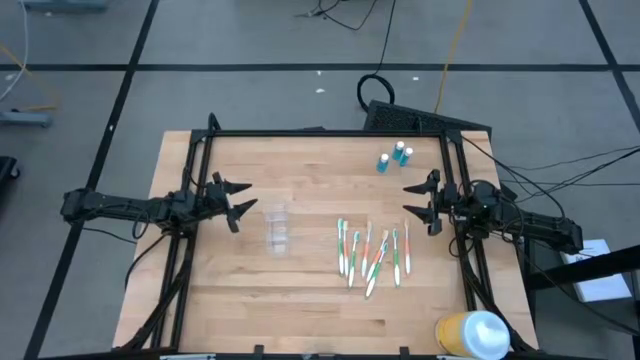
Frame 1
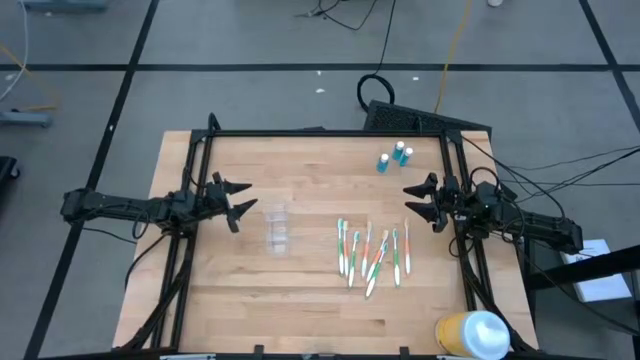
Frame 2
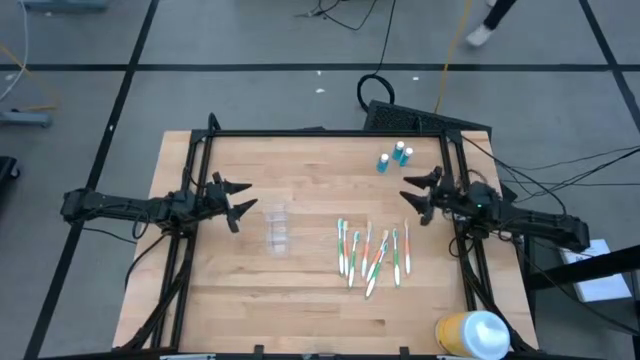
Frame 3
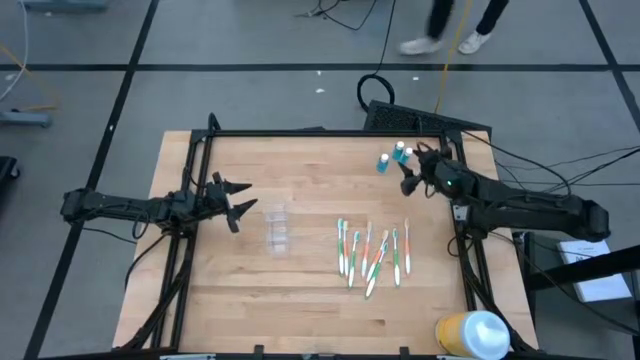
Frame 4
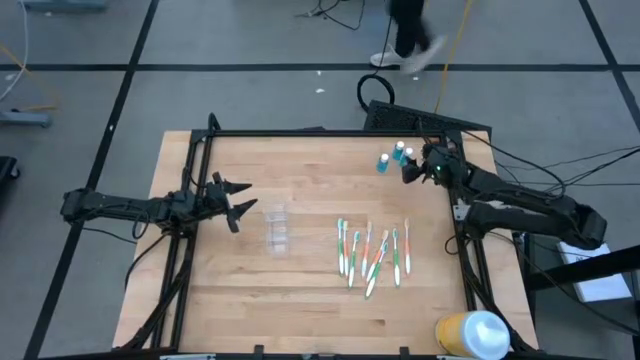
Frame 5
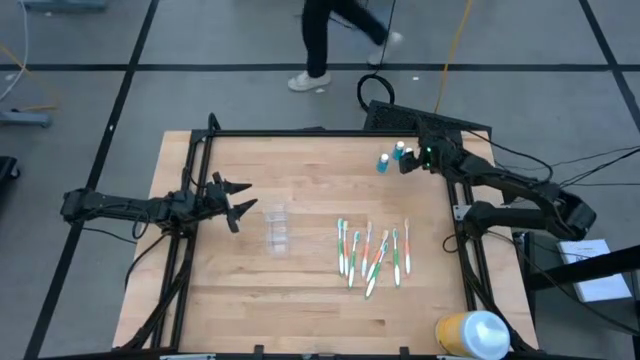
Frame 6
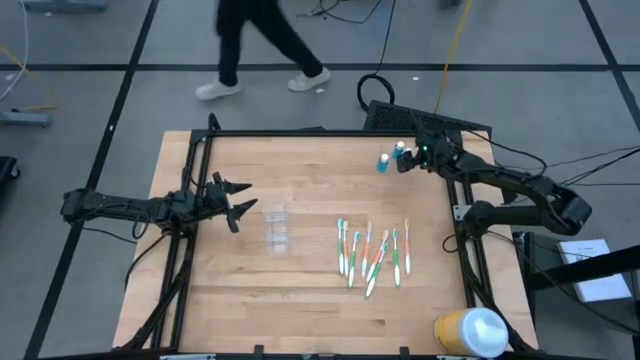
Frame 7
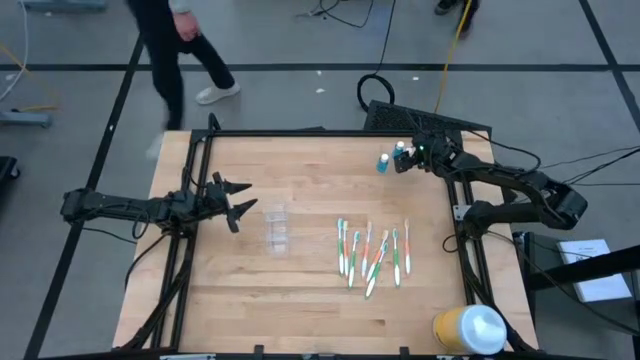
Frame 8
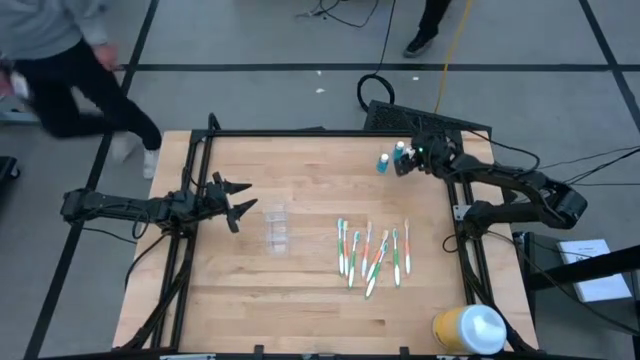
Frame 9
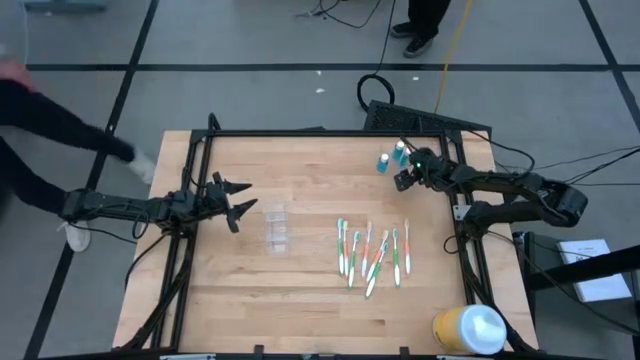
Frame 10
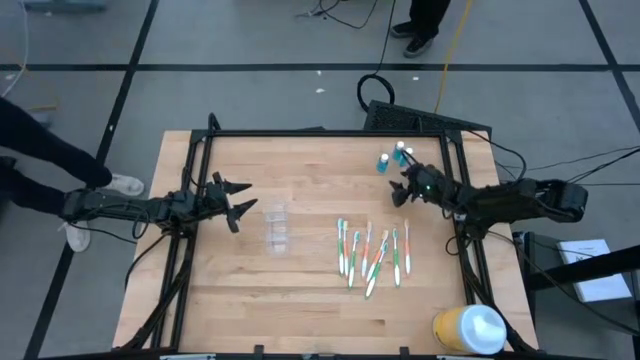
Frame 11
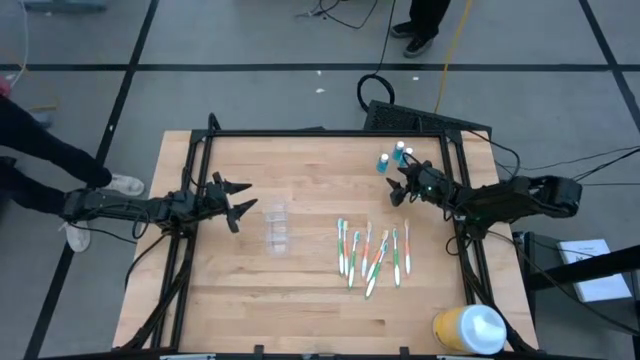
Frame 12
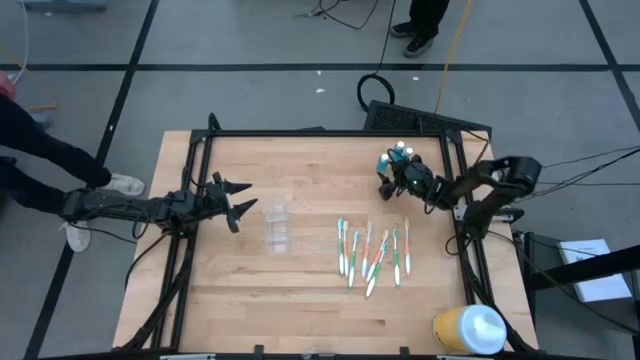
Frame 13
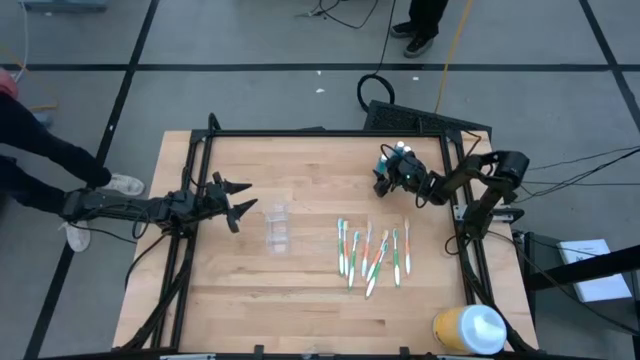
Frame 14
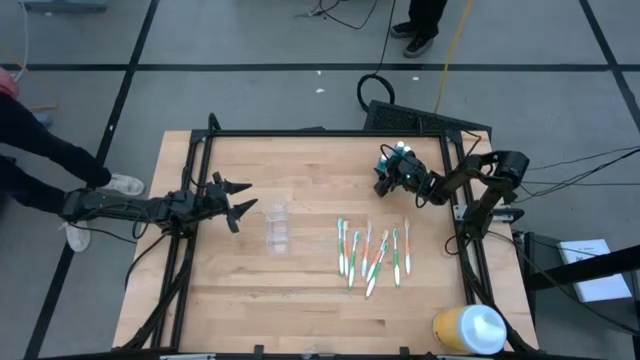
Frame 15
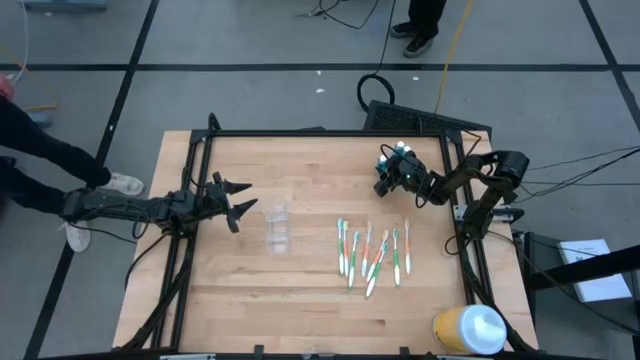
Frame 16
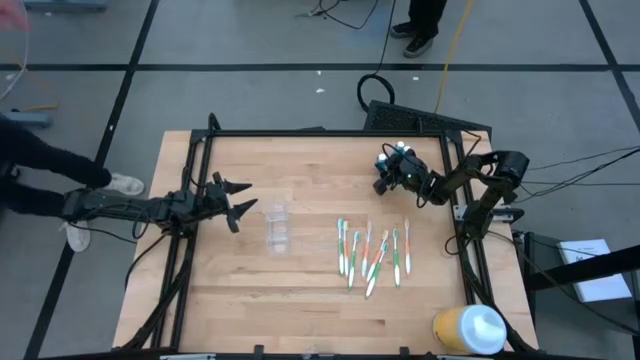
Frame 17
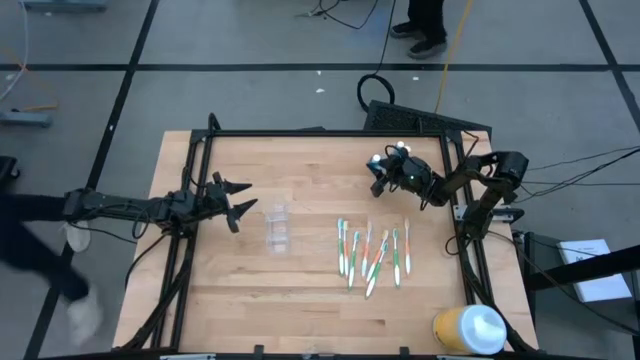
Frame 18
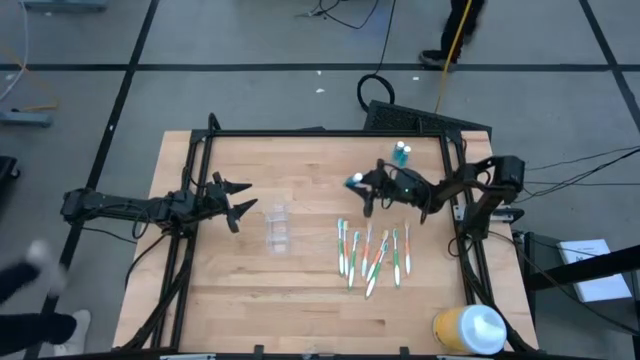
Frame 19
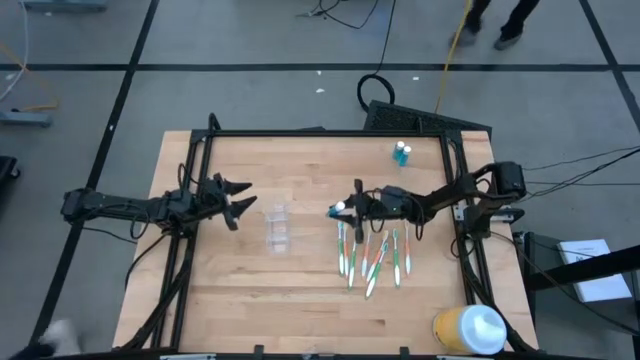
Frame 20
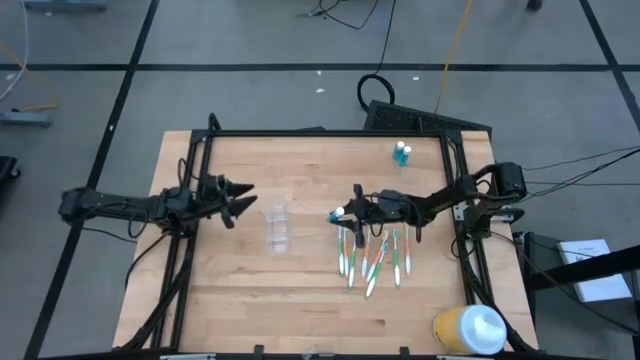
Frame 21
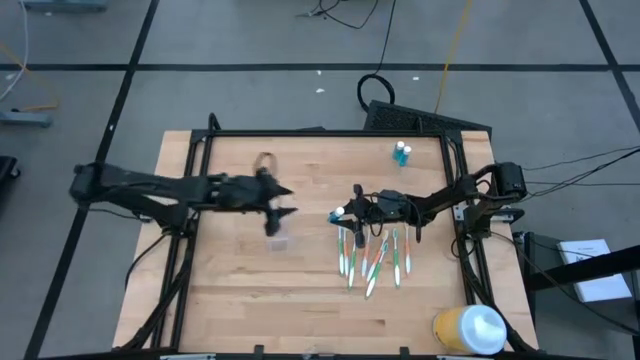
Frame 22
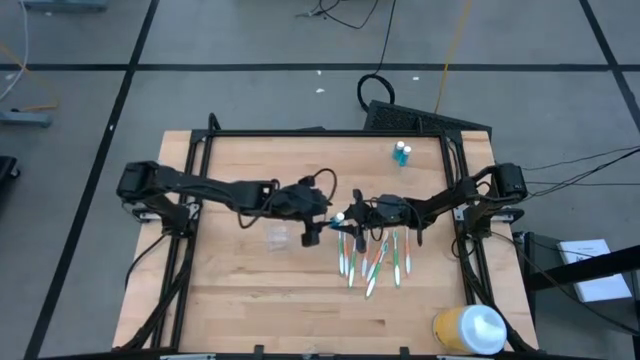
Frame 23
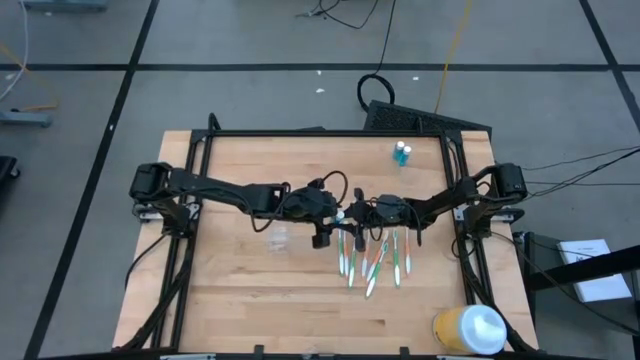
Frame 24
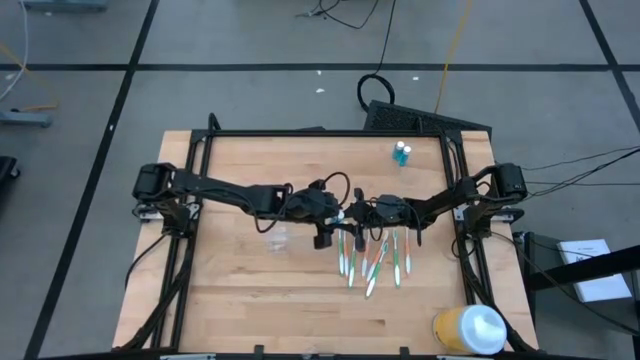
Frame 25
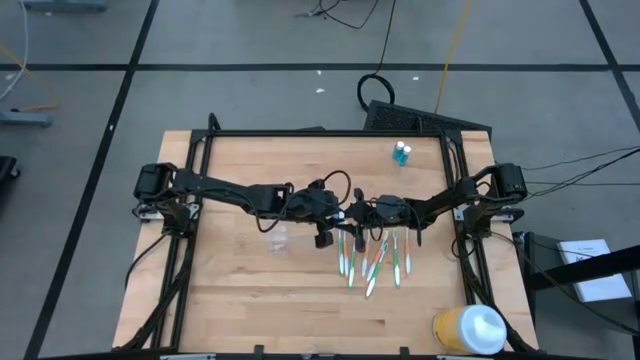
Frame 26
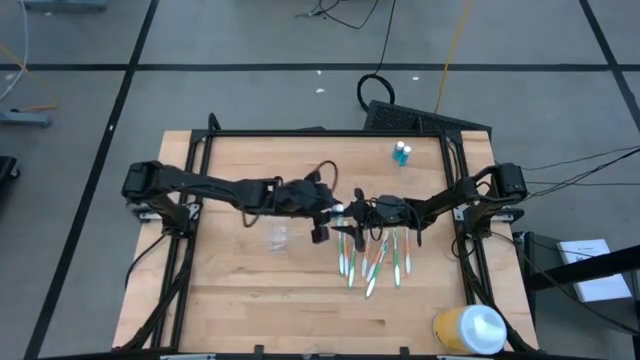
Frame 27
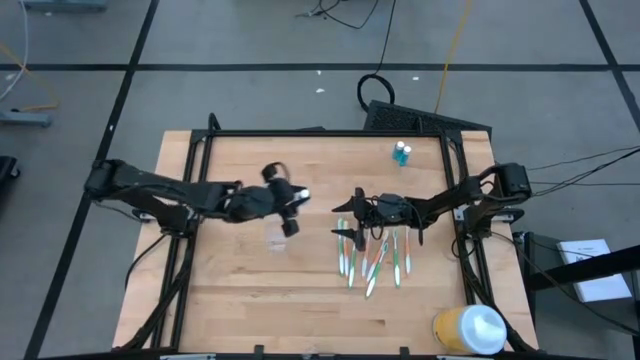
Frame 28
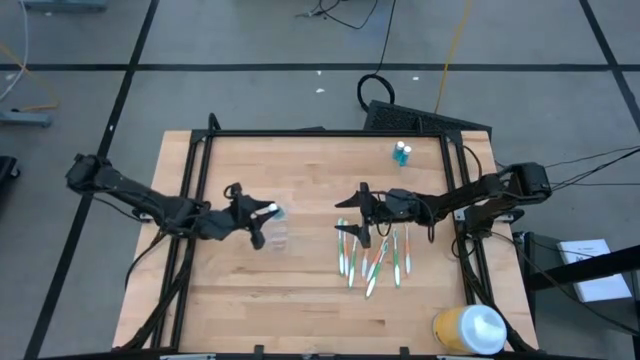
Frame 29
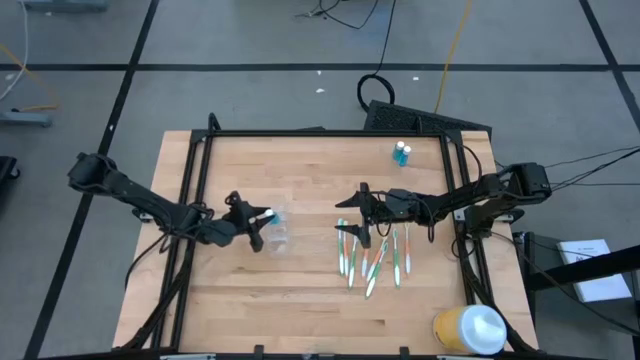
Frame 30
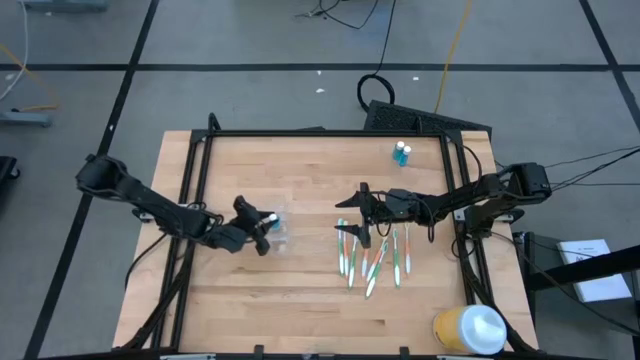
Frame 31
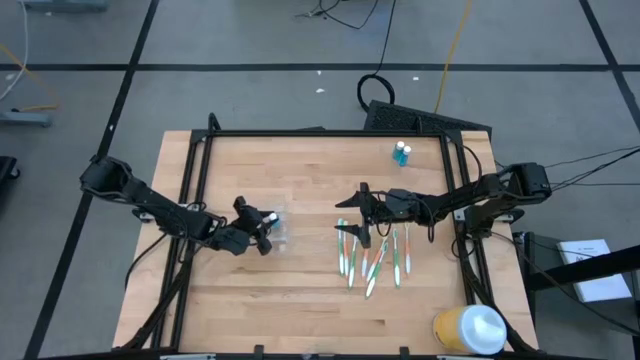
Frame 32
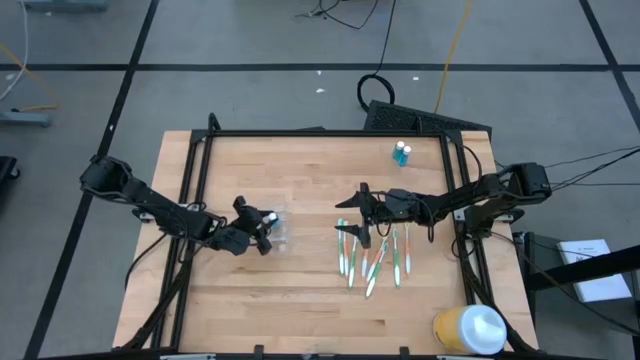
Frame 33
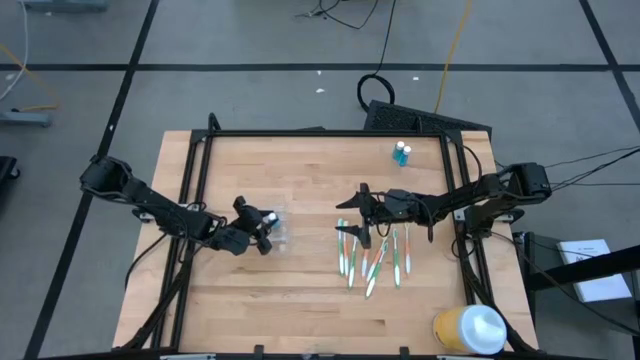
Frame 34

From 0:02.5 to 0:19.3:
Task: Pick & Place toothbrushing station
Put the blue mouthwash in the transparent organizer

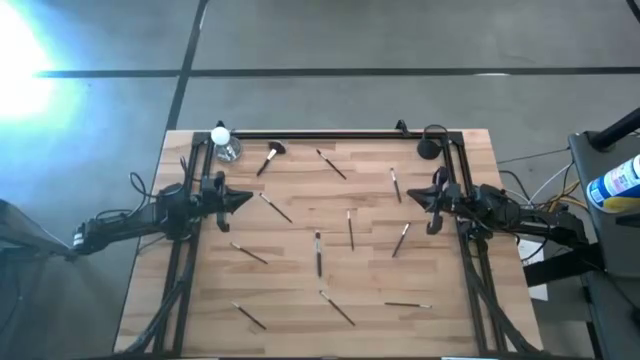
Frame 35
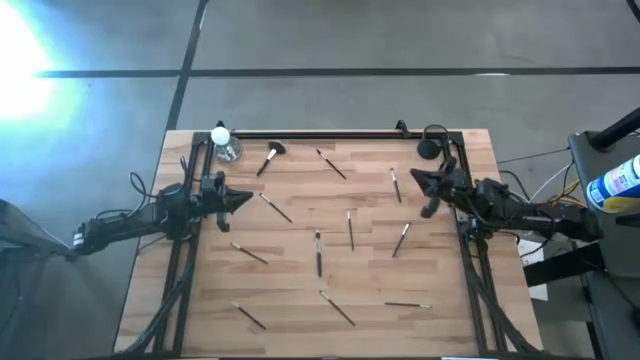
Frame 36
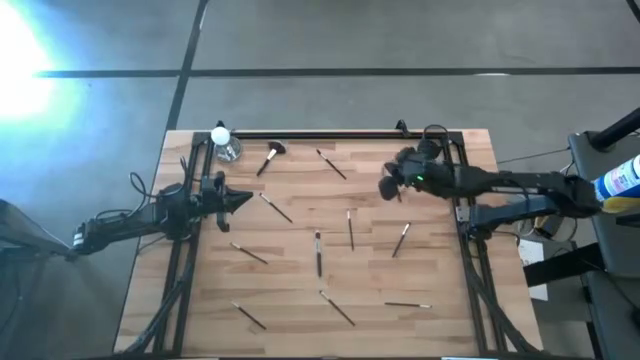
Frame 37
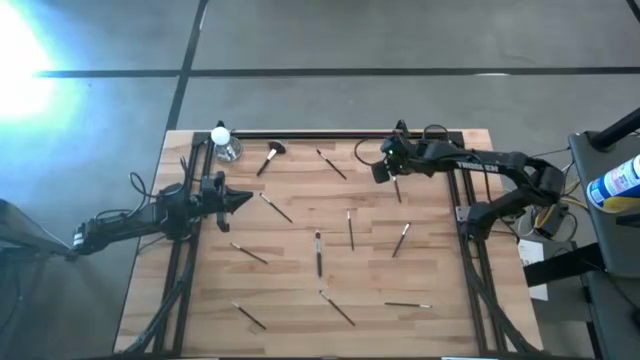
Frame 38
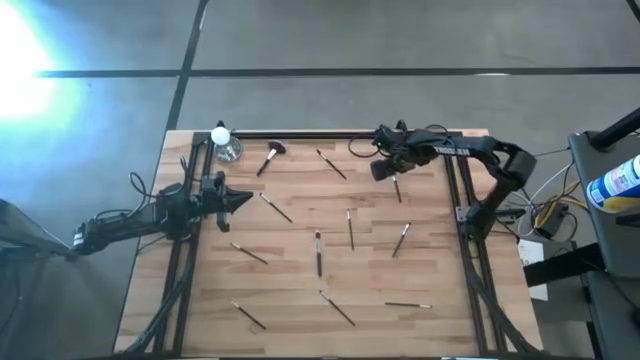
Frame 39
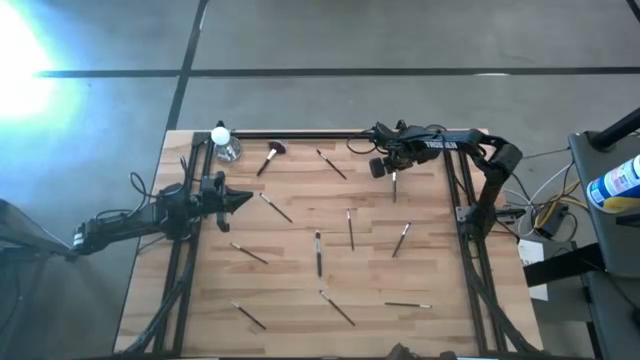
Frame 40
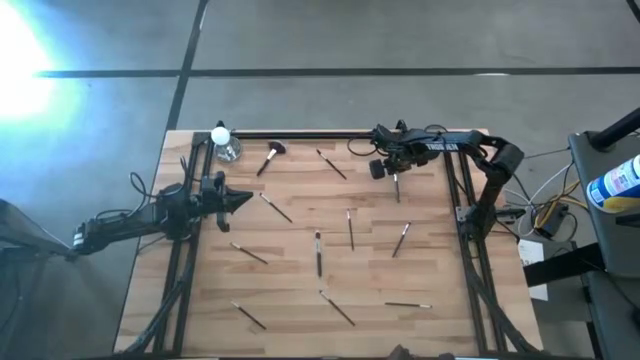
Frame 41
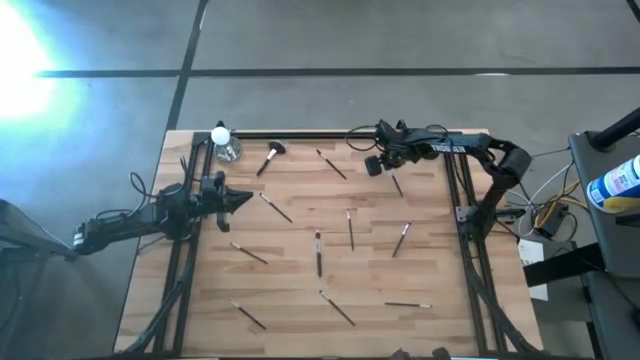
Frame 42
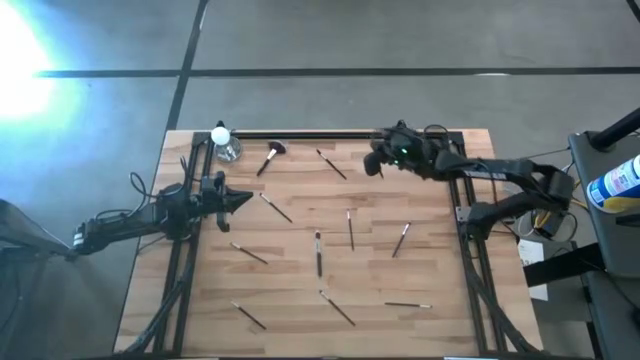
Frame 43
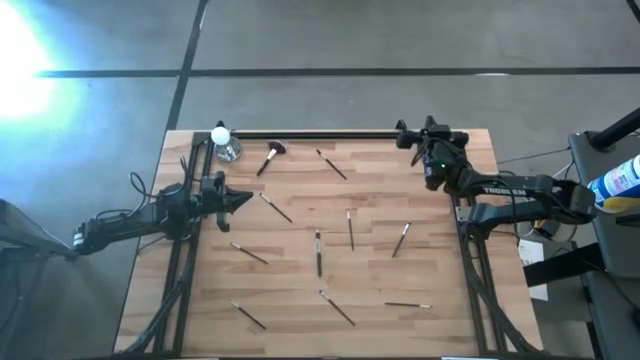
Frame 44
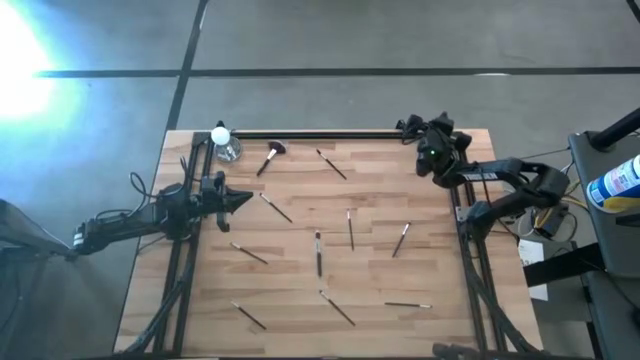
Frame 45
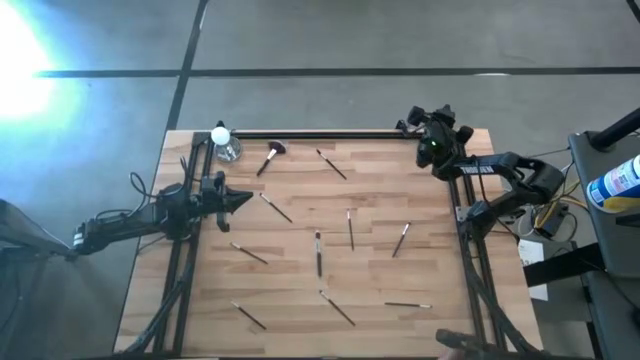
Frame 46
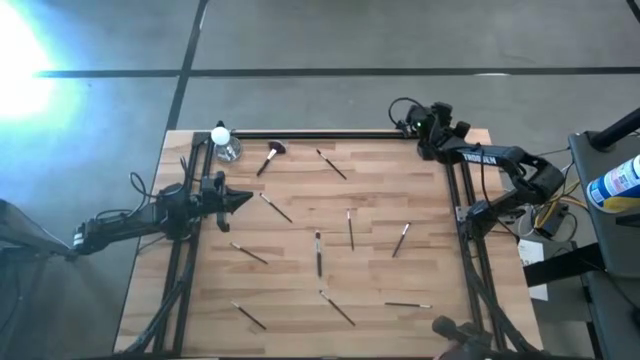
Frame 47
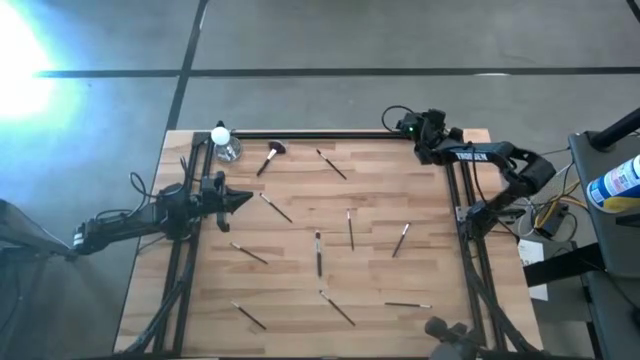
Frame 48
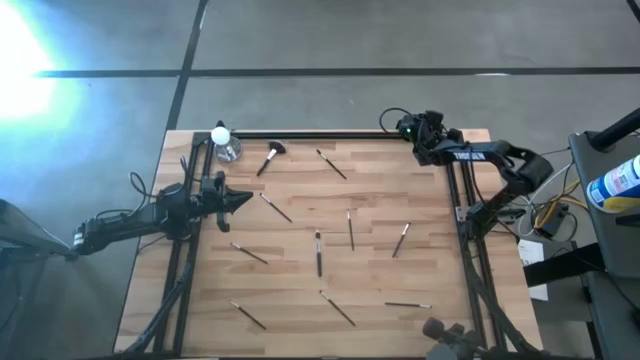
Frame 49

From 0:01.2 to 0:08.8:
Task: Put items in baskets/containers
Put the foundation brush into the mesh organizer
